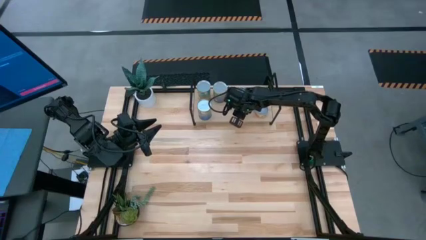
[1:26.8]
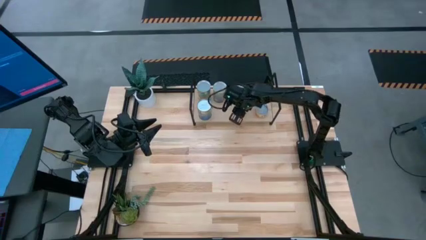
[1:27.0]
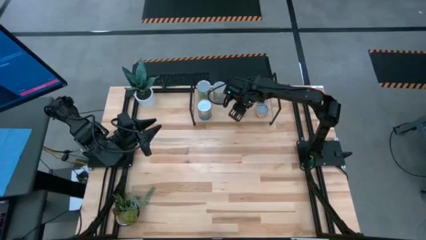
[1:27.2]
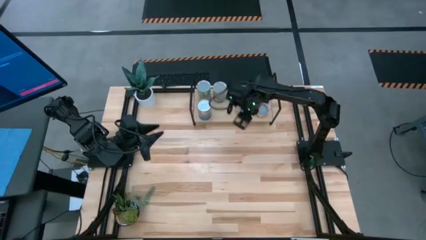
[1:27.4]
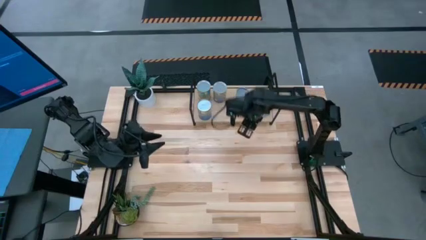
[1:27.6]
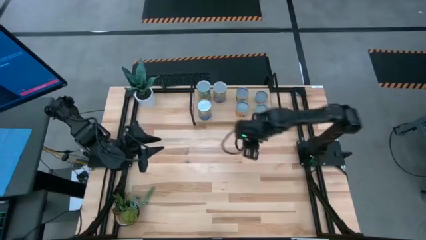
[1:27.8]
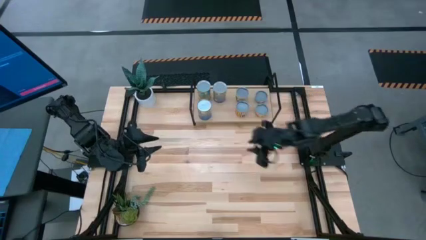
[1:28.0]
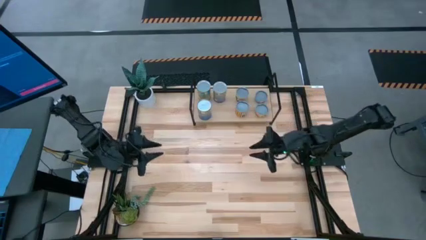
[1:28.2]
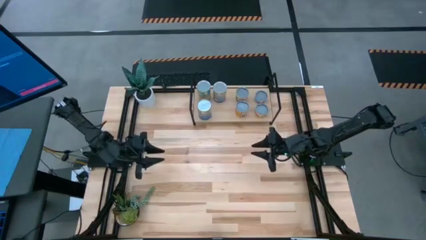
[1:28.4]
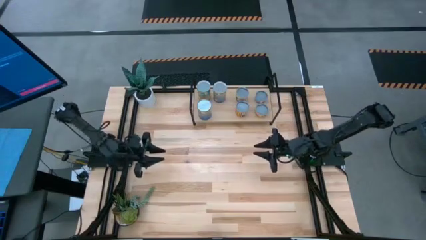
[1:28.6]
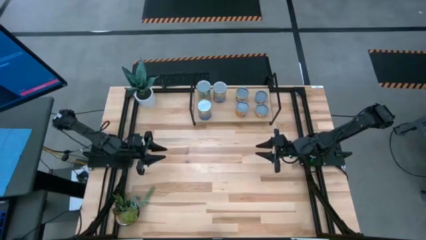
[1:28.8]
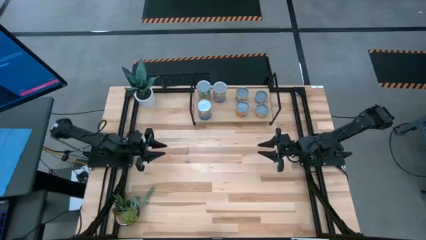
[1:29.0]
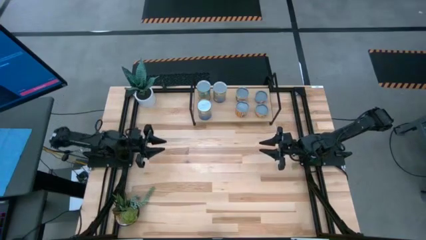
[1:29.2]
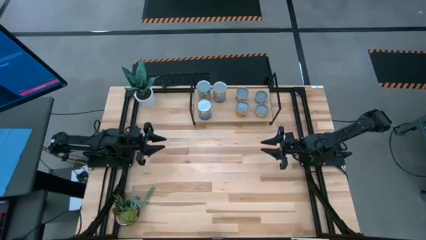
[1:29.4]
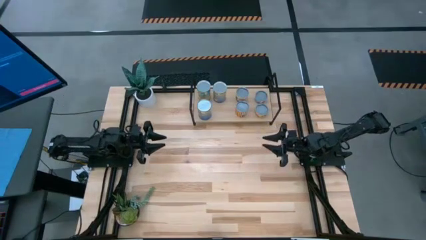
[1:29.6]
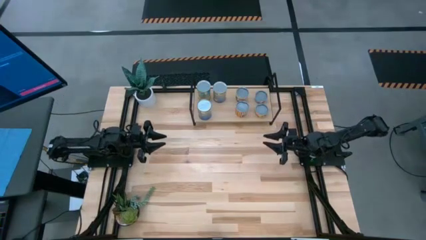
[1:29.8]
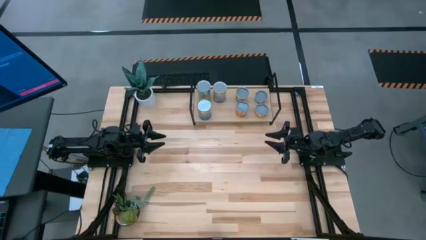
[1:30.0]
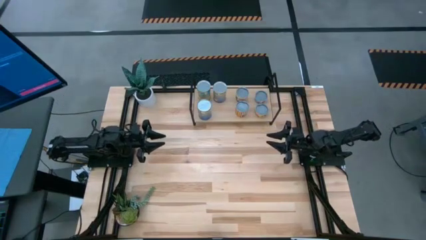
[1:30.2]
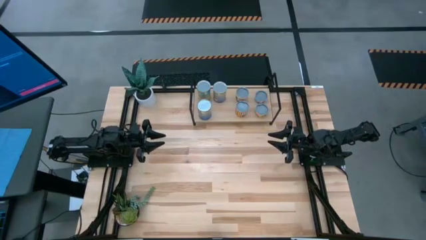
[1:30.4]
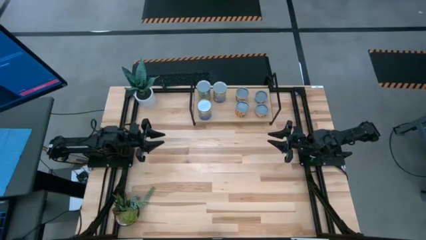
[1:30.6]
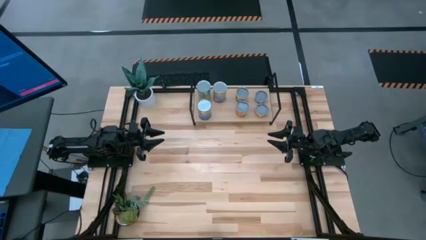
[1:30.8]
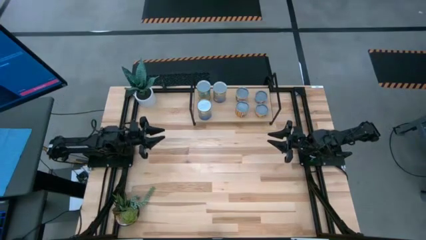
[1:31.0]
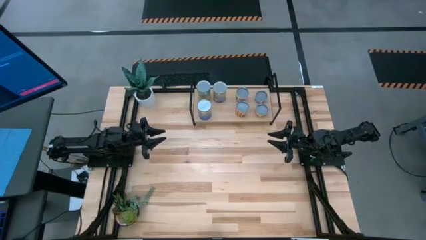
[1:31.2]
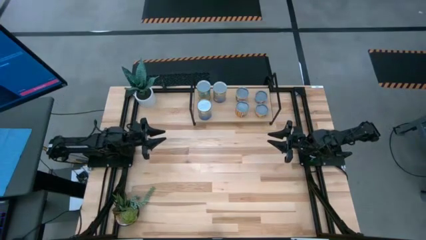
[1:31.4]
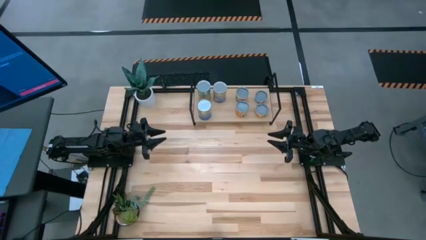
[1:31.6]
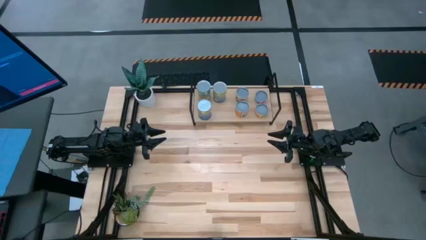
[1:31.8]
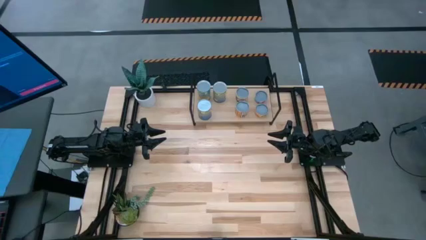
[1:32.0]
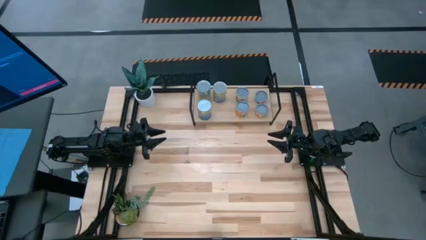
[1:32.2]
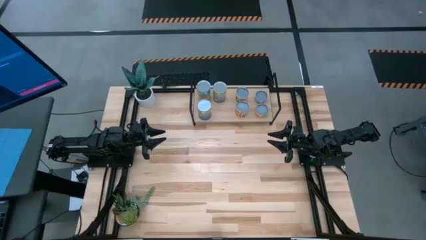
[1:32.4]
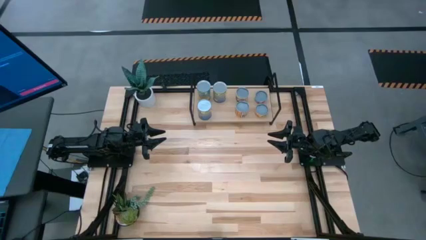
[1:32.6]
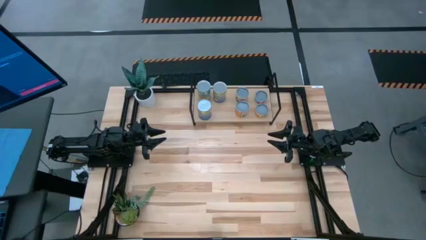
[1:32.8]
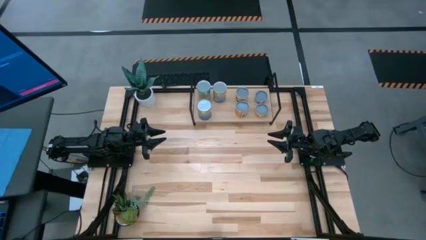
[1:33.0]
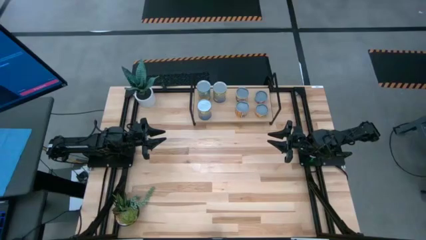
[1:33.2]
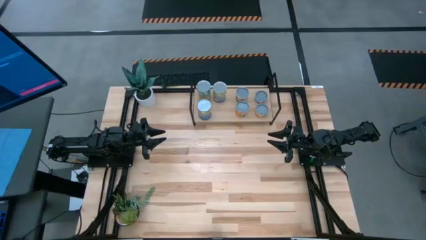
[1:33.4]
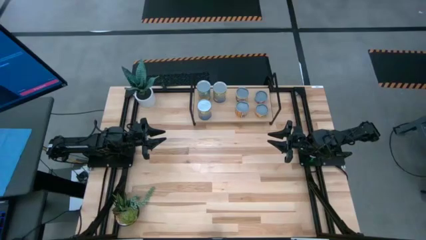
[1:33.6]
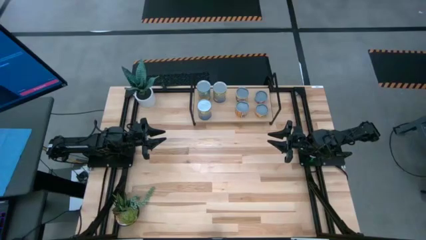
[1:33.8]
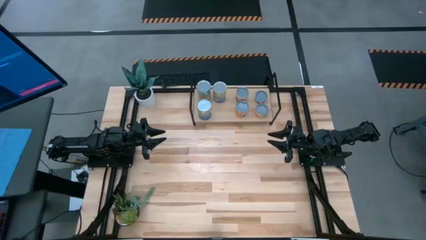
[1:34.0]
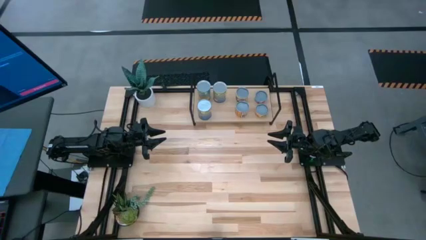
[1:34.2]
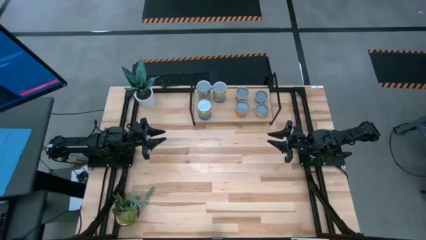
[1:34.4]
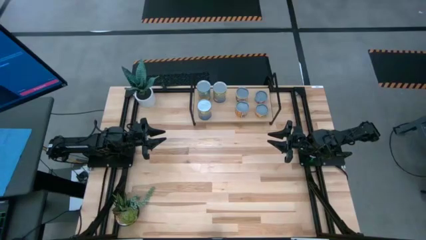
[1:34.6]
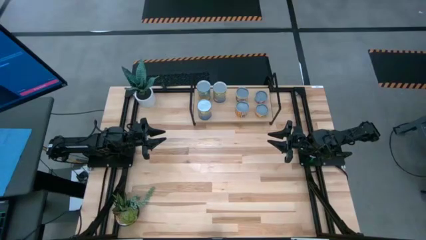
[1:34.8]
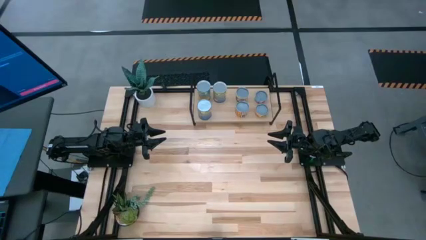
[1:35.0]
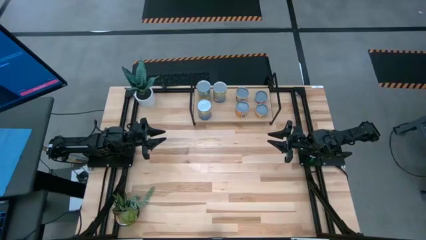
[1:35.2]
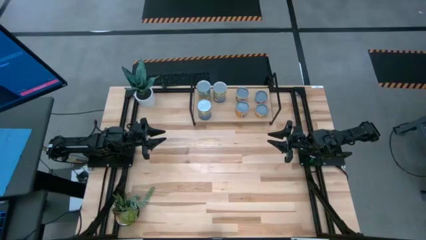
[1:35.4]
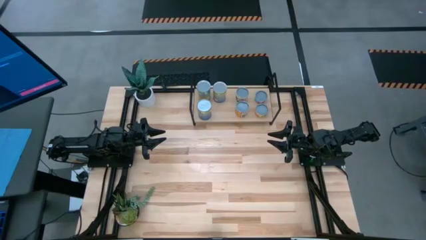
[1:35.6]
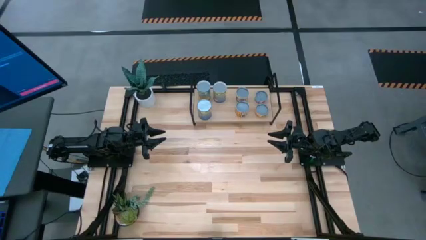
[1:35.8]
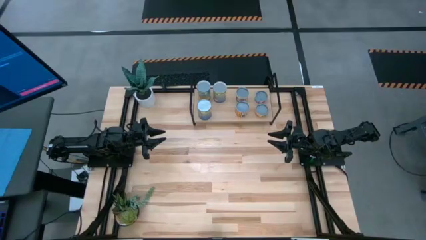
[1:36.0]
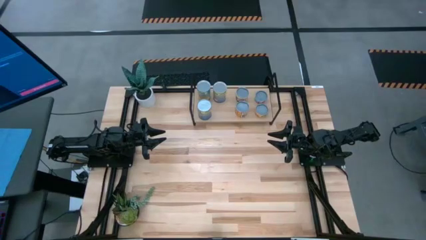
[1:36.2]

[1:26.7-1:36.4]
Task: Pick and place cans onto a shelf
Return to Home Position

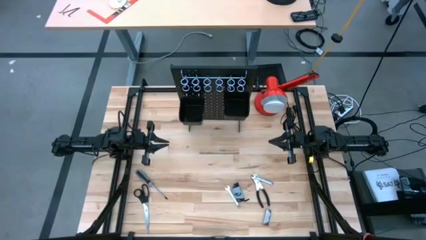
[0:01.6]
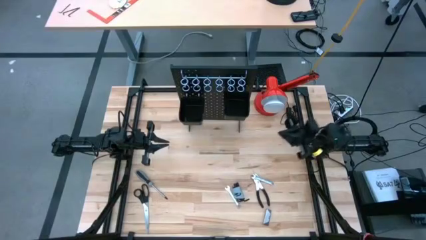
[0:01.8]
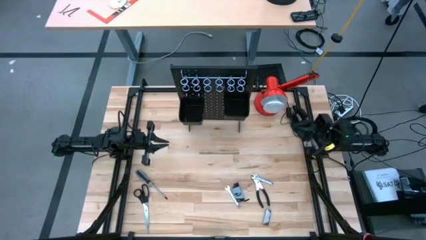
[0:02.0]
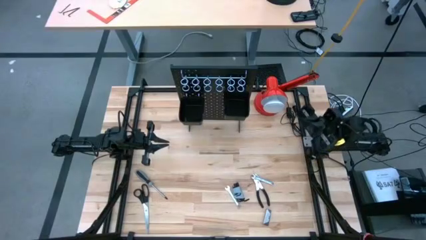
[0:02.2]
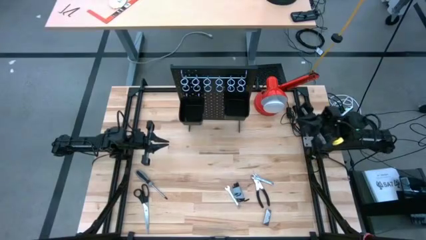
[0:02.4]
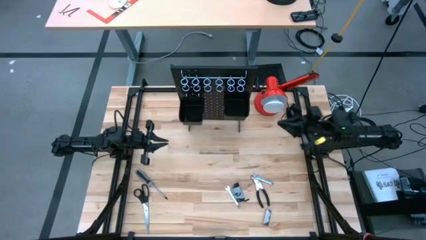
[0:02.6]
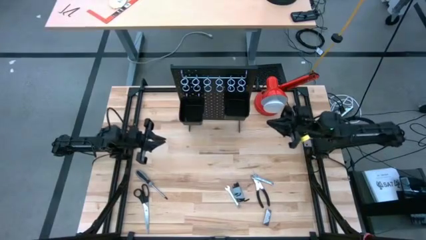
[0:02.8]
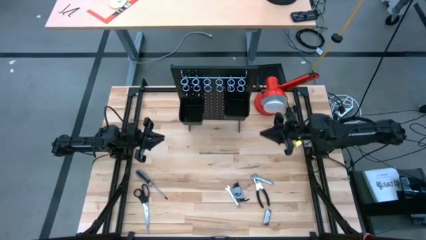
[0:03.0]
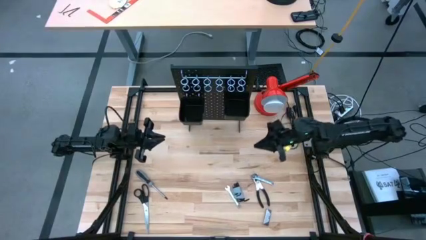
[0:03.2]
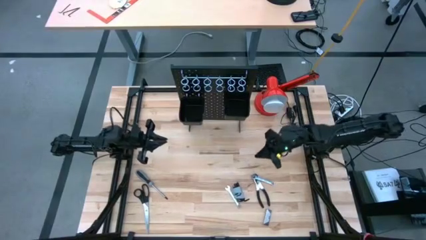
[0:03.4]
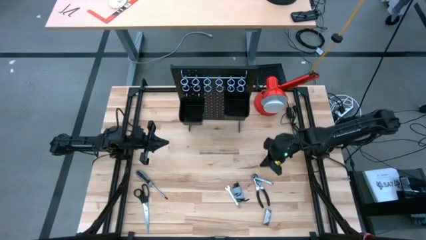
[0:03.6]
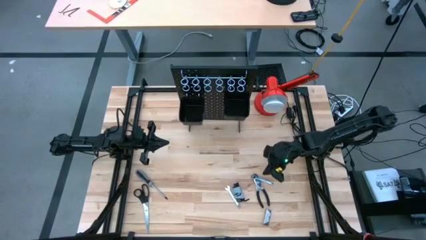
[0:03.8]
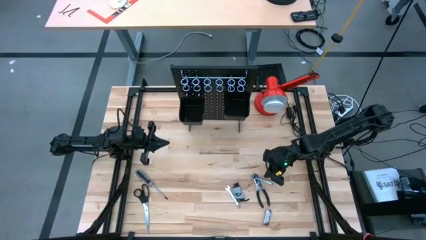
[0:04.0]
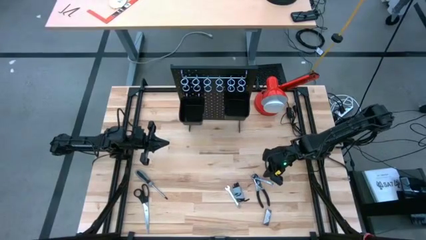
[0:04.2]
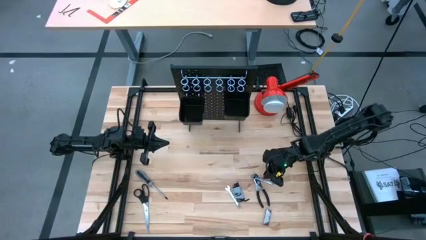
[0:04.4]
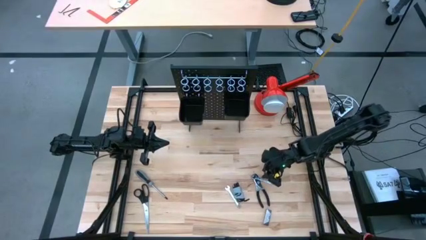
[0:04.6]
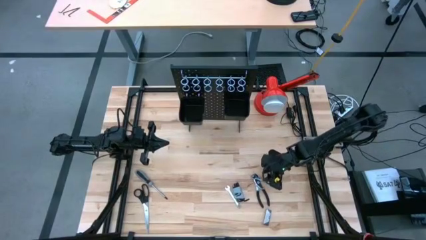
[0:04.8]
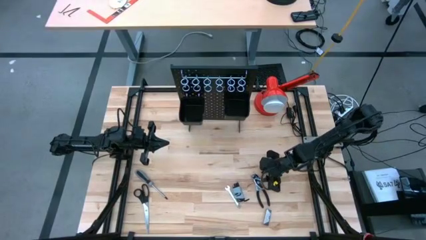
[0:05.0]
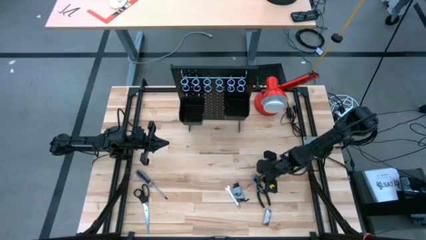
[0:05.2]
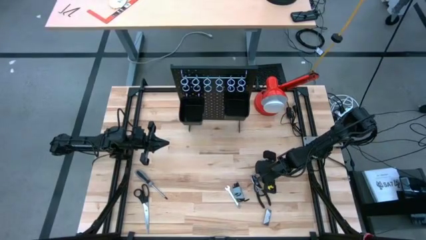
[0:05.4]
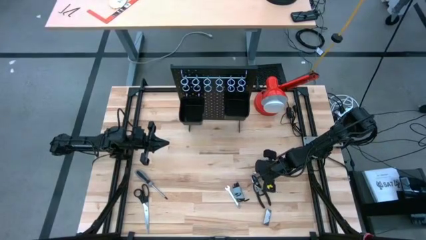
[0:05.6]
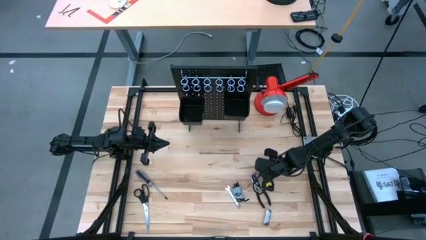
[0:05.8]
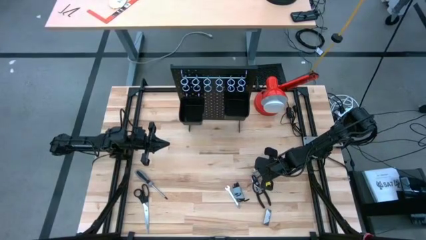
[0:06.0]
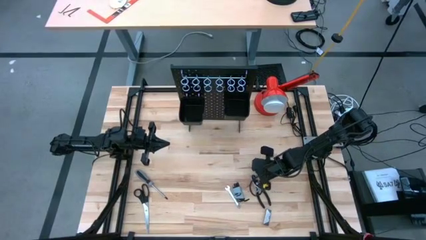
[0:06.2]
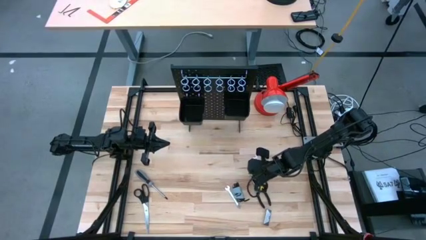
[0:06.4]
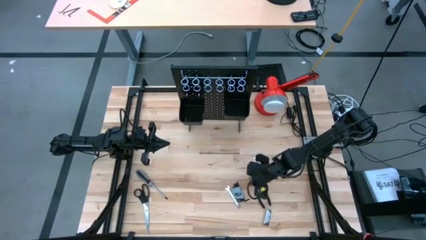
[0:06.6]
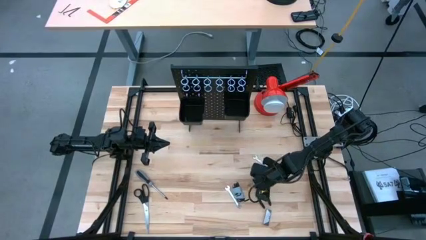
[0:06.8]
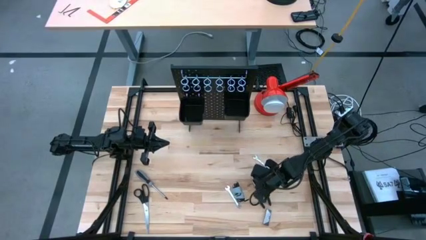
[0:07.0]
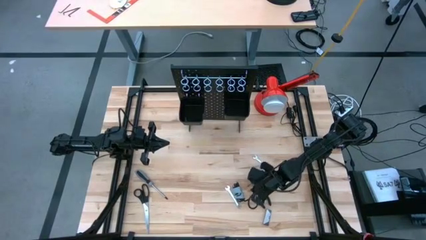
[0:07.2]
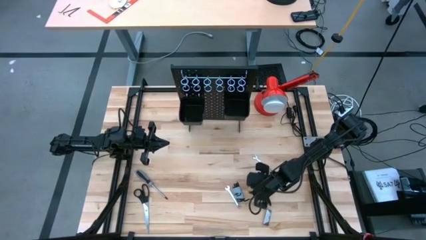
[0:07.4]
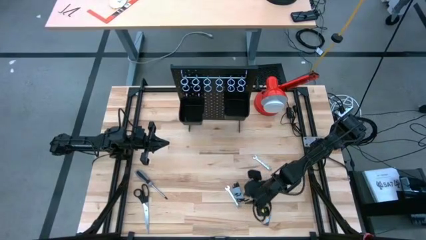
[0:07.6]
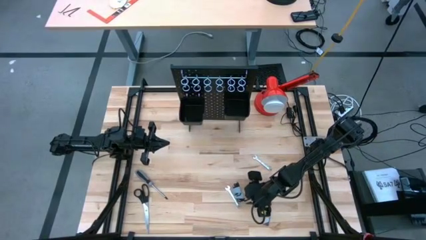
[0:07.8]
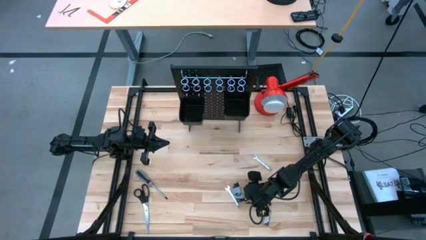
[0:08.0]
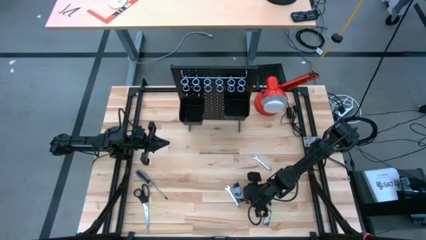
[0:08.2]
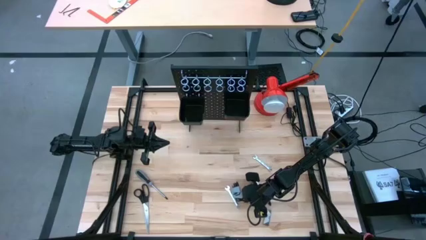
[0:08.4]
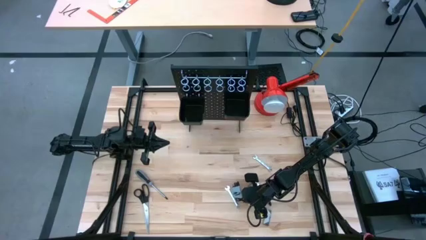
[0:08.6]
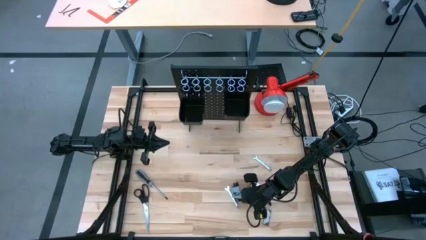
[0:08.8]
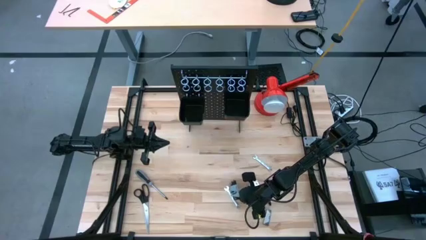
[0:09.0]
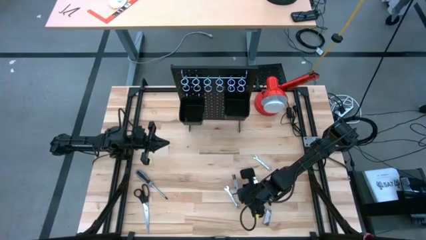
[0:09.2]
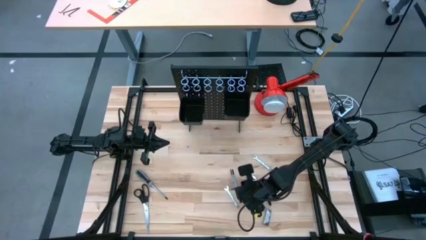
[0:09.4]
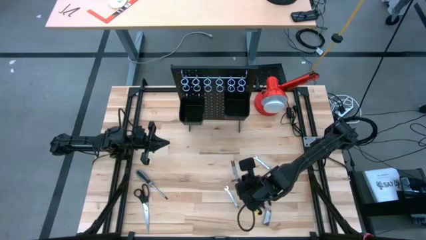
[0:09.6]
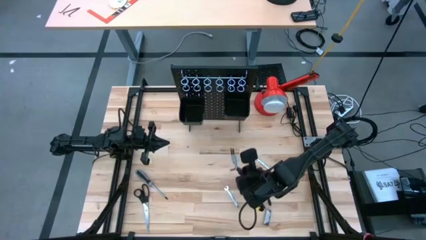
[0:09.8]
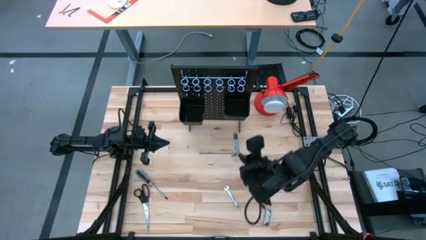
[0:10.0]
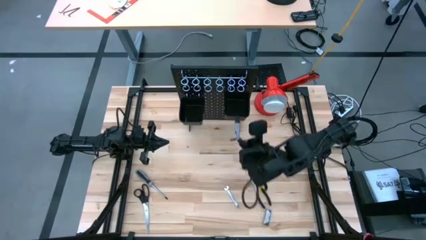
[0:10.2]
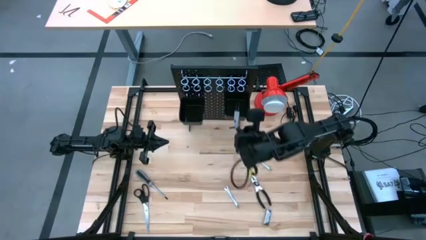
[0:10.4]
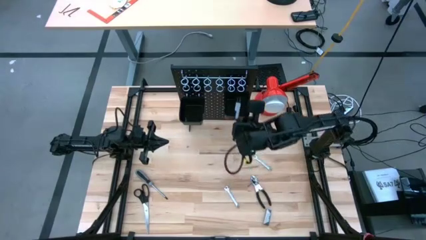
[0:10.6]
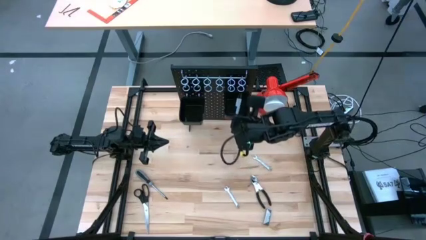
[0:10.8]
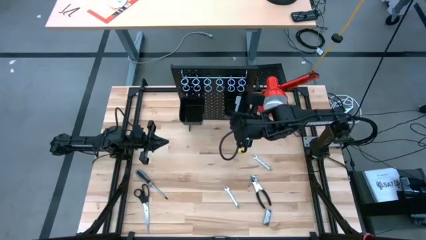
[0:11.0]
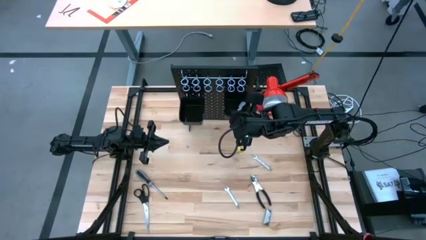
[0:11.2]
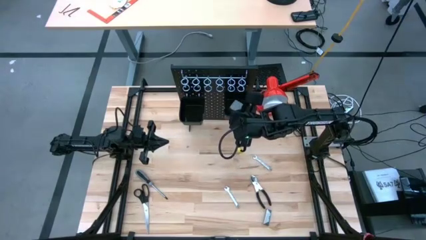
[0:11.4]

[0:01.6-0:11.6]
Task: Hang tools onto peg board
Put the black allen wrench set into the top black basket on the pegboard
